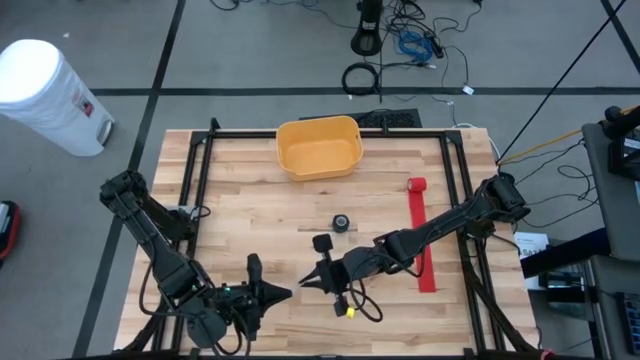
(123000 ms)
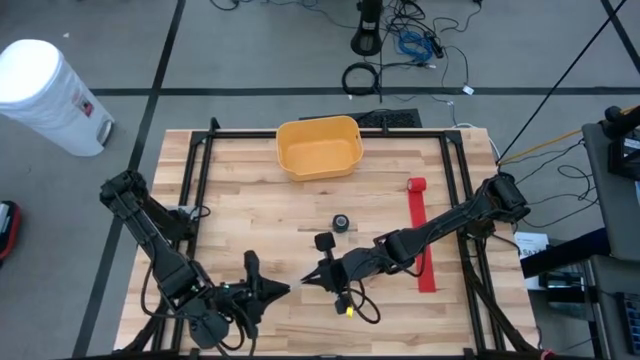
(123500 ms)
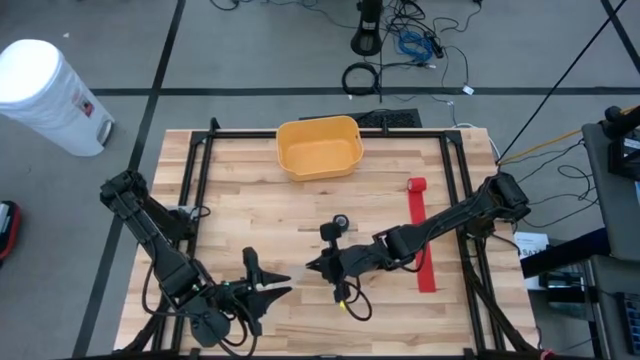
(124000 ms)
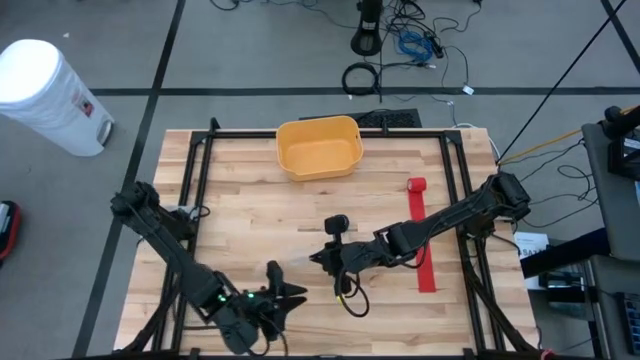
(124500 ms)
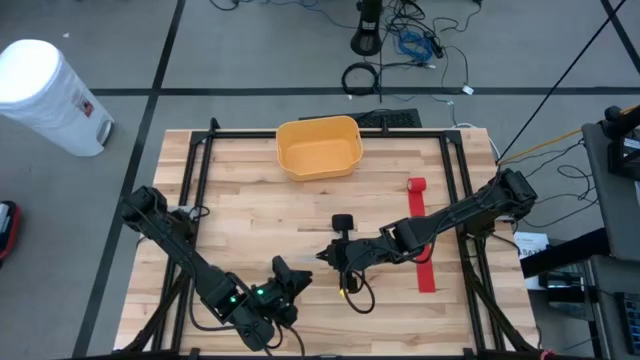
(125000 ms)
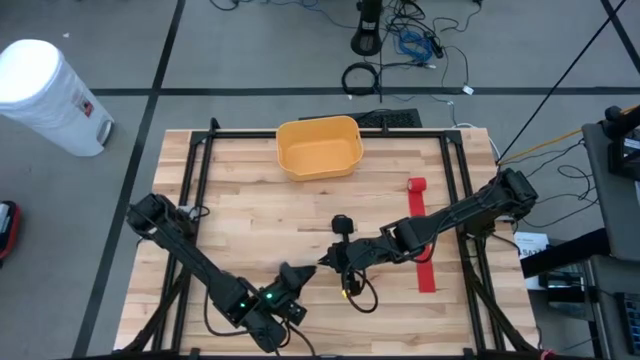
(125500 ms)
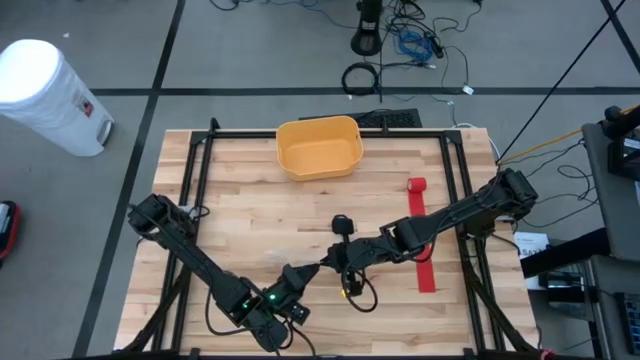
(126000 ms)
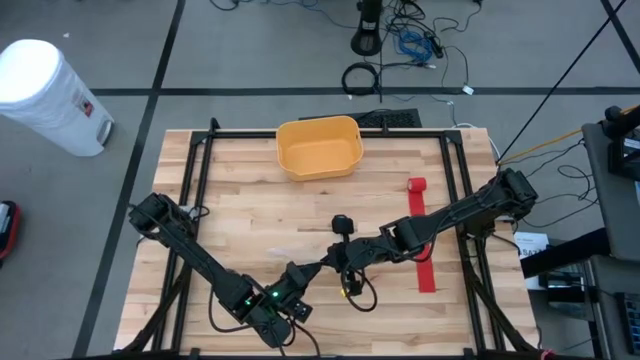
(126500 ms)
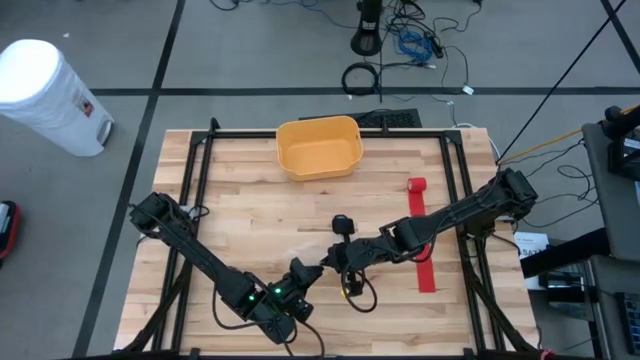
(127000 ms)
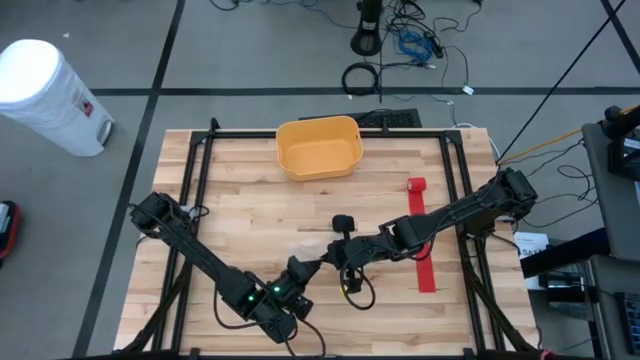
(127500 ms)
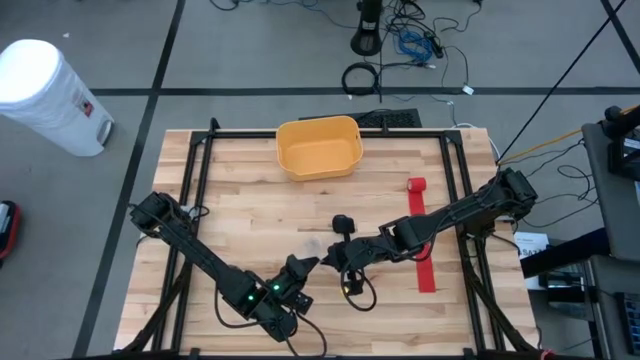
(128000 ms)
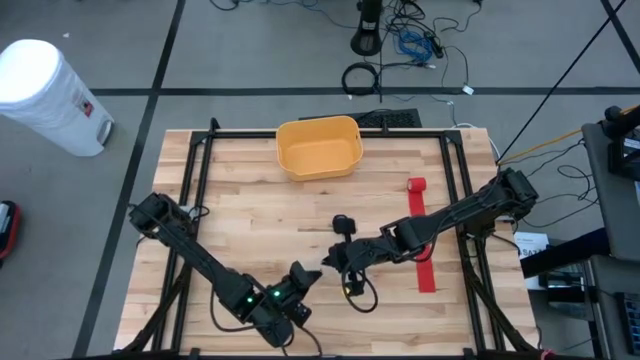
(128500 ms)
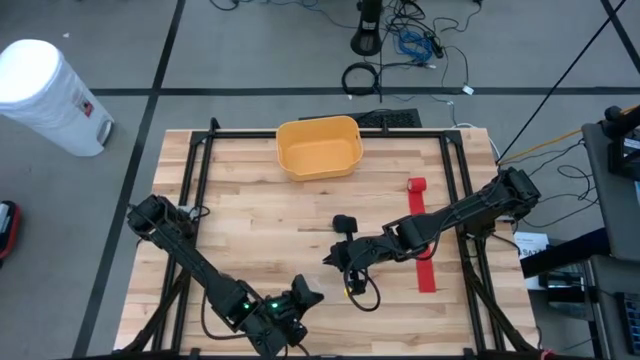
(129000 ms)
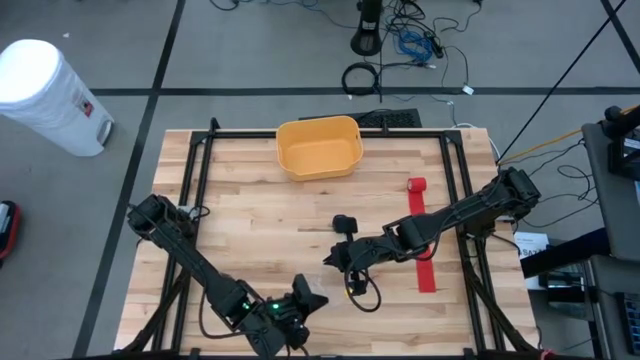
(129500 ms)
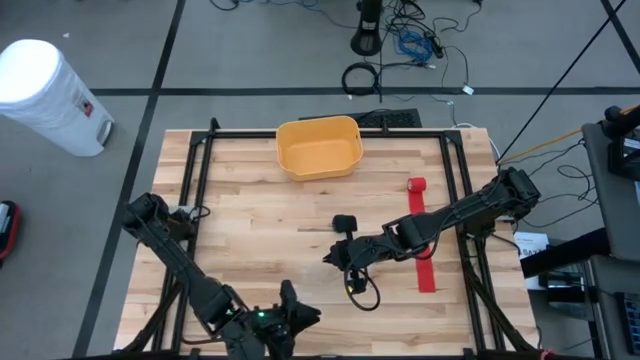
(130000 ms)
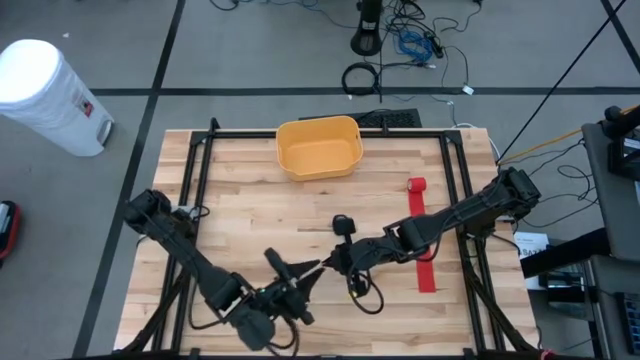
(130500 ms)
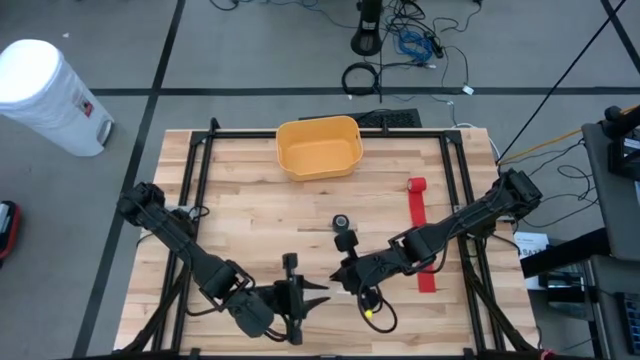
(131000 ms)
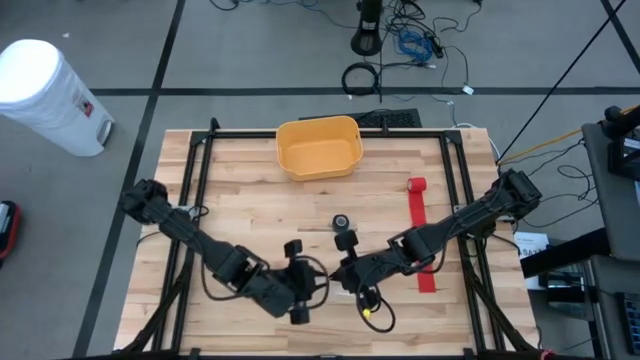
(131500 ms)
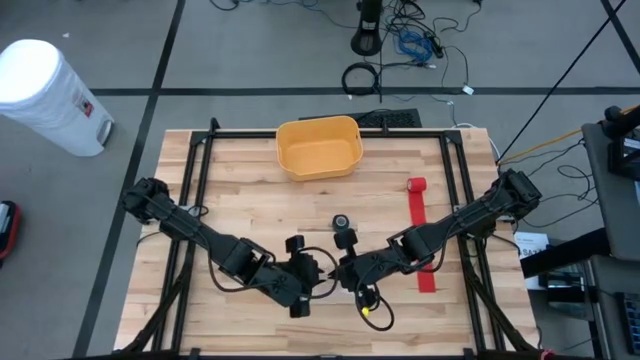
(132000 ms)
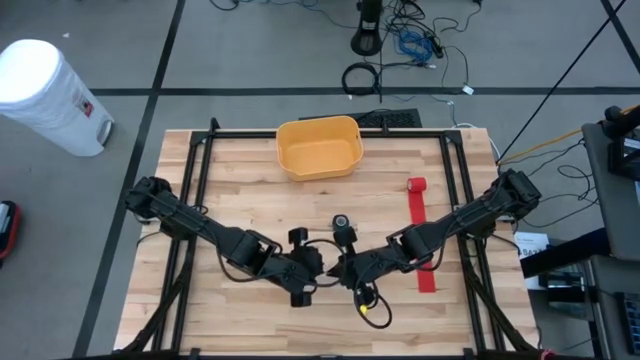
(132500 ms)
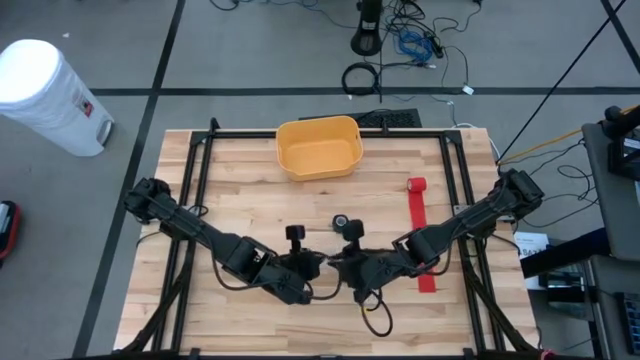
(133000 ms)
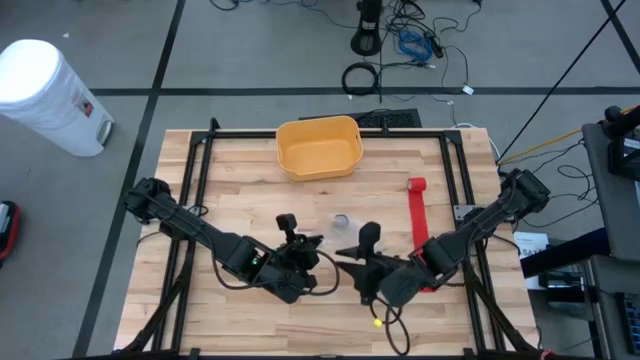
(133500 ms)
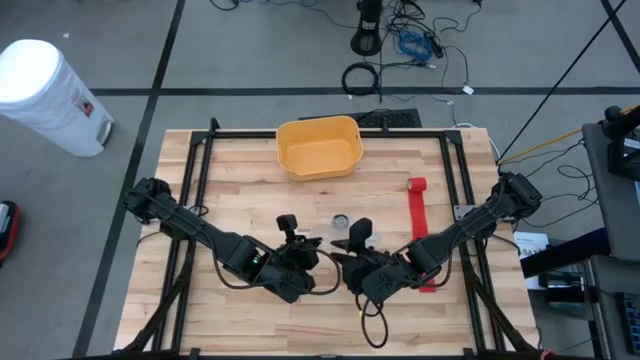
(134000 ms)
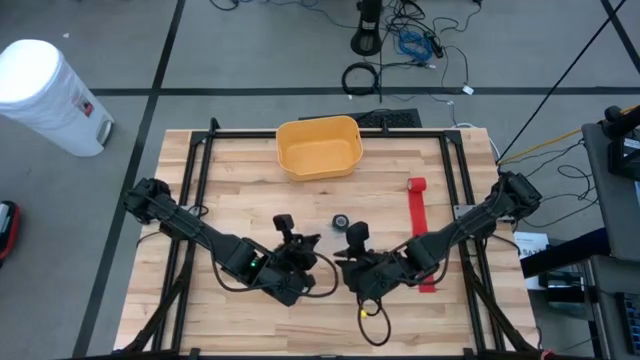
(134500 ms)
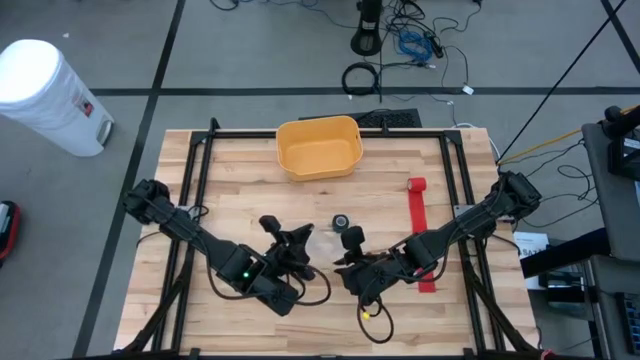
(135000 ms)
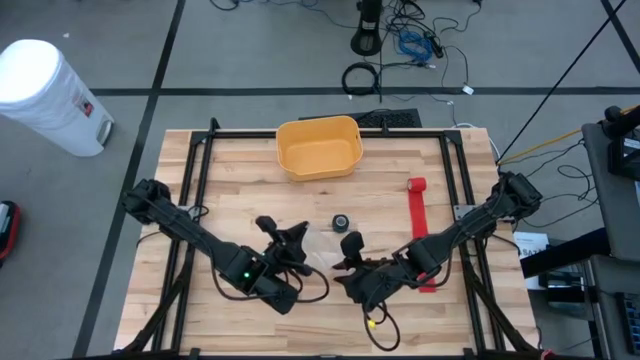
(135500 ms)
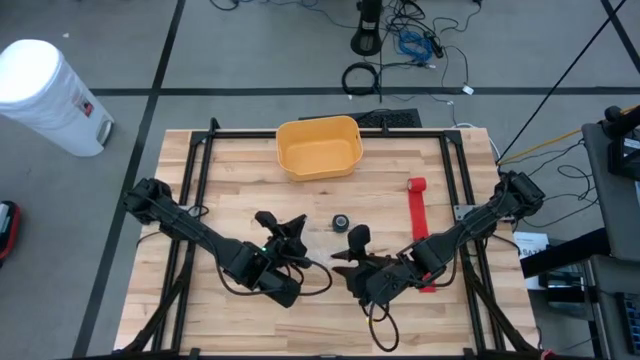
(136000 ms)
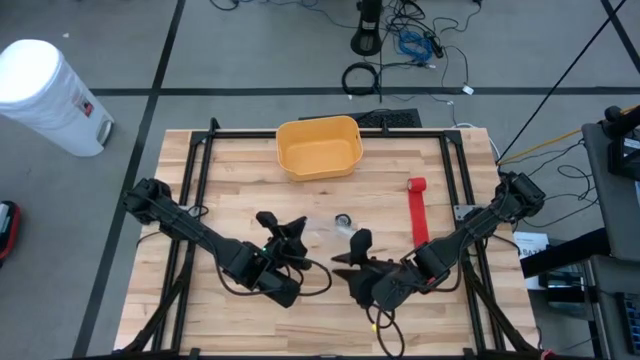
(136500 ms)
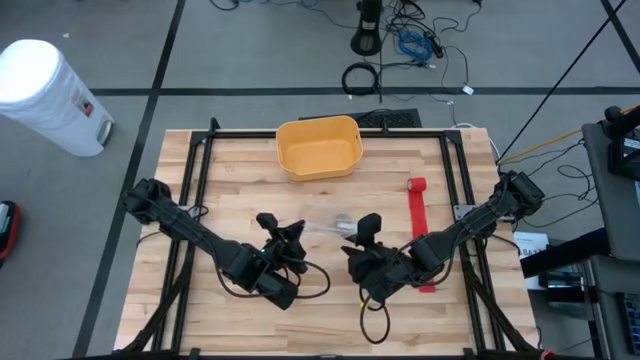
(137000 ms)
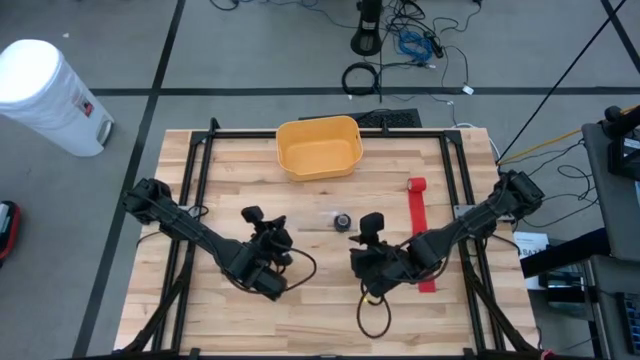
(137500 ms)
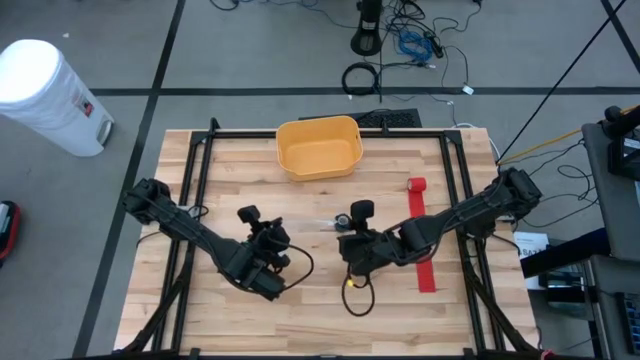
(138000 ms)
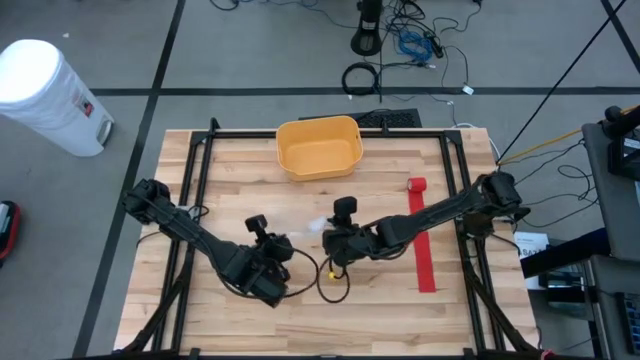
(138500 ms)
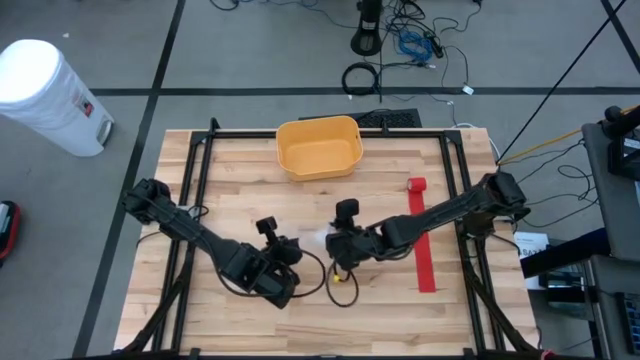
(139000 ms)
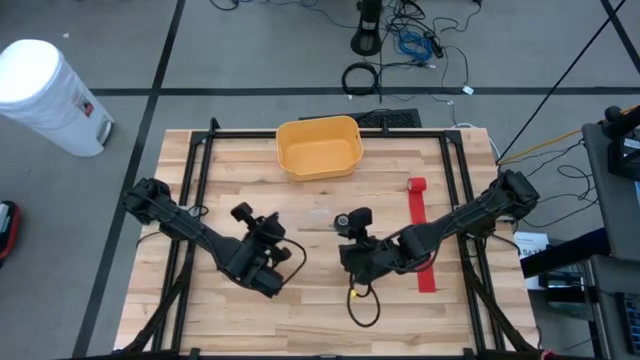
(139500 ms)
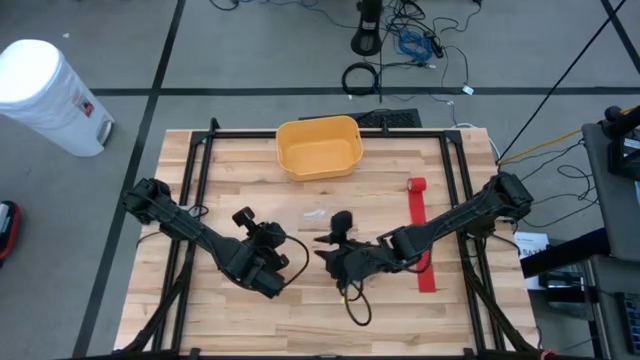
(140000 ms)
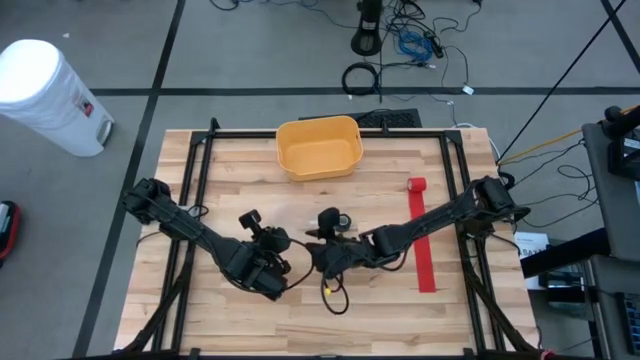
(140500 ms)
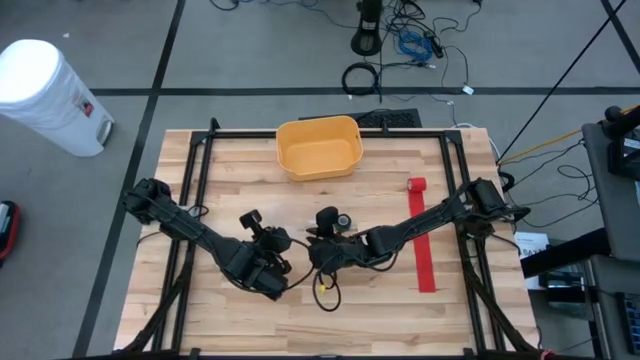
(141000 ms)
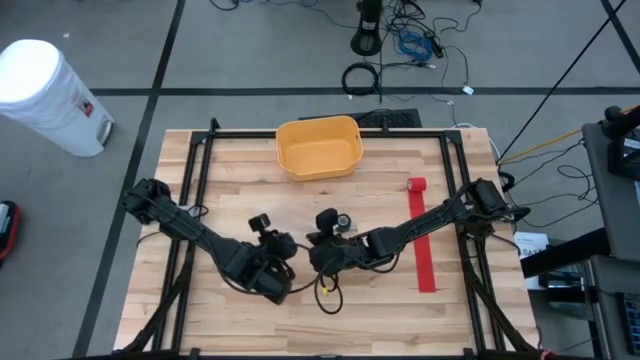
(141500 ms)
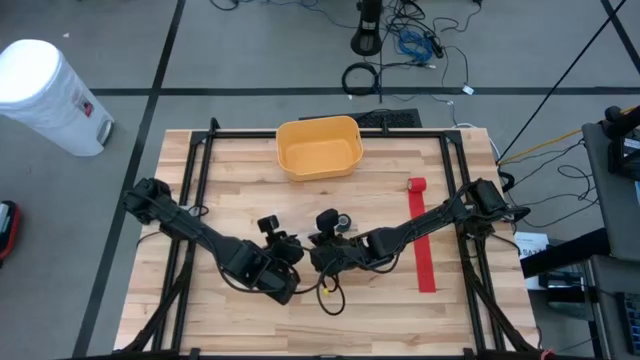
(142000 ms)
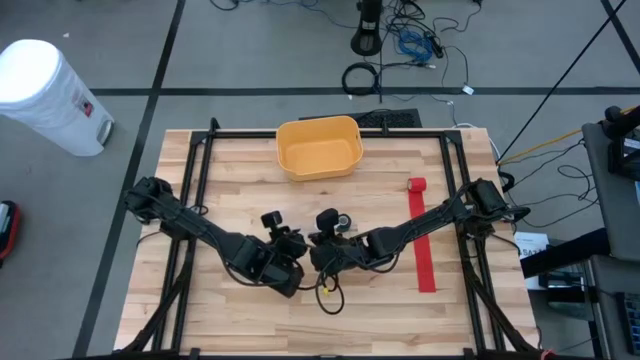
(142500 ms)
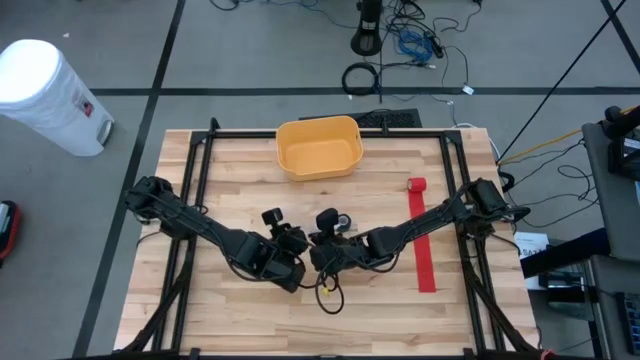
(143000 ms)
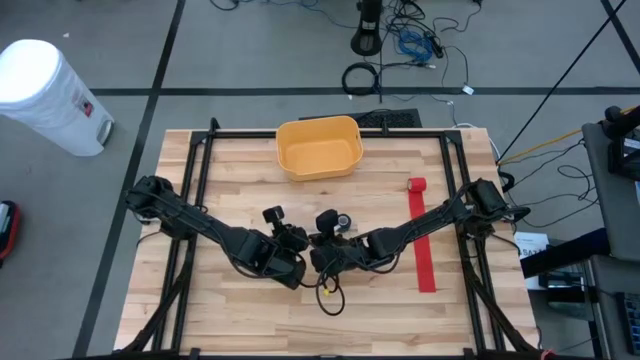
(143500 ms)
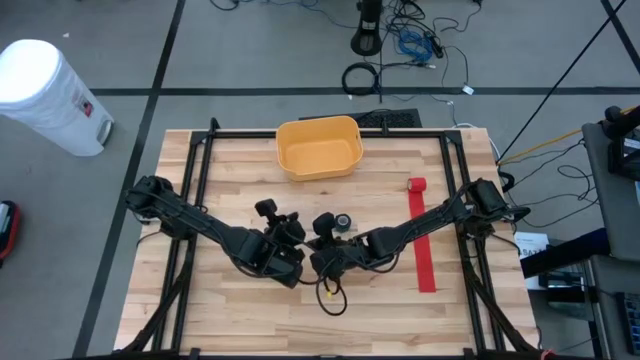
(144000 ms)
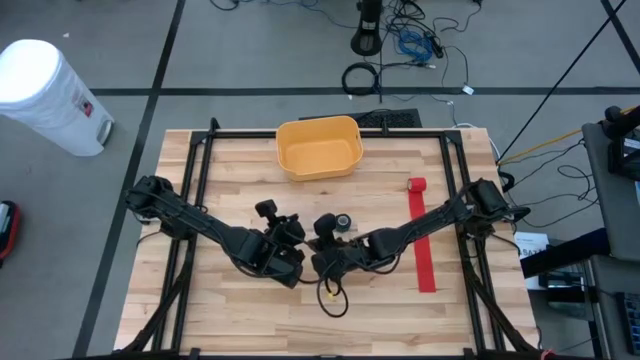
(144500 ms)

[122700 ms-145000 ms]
Task: Roll bandage
Open the transparent zip bag
